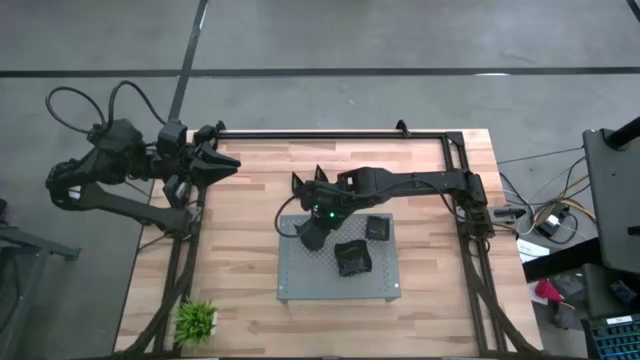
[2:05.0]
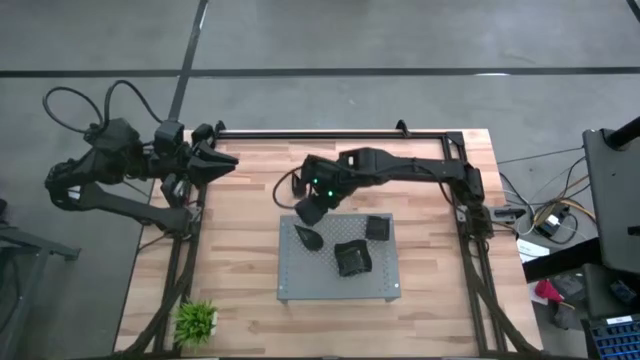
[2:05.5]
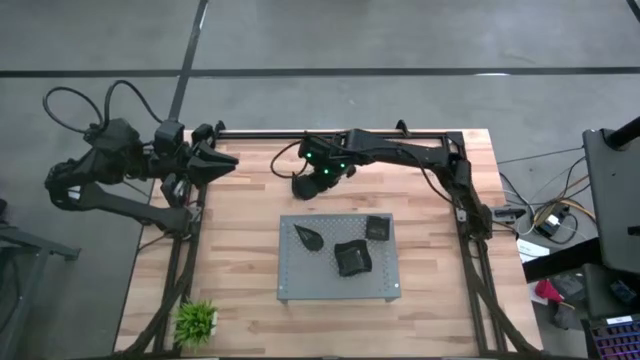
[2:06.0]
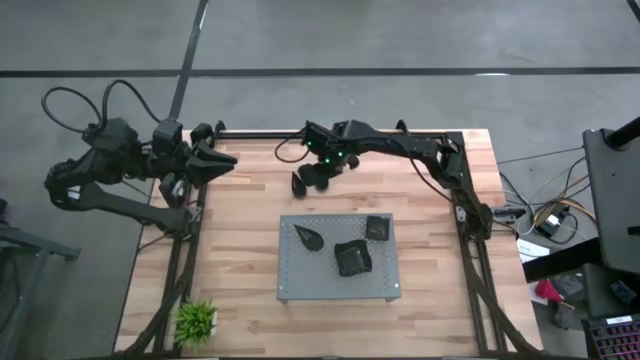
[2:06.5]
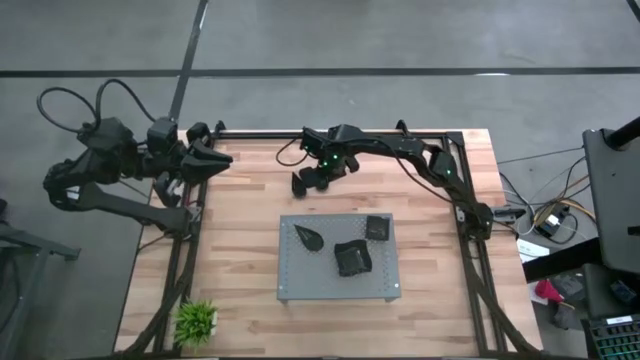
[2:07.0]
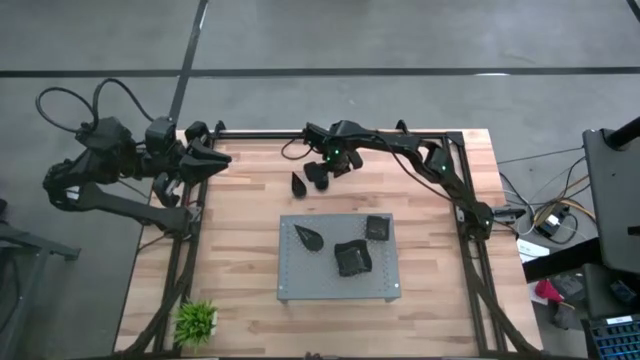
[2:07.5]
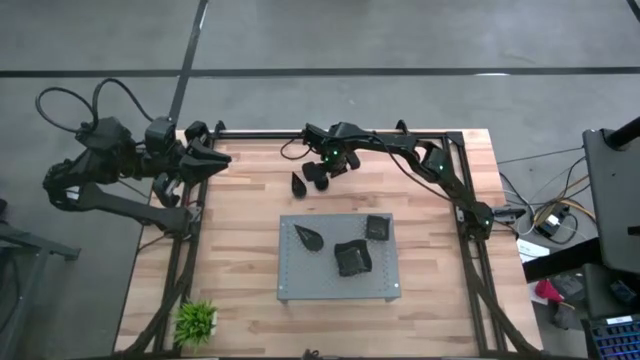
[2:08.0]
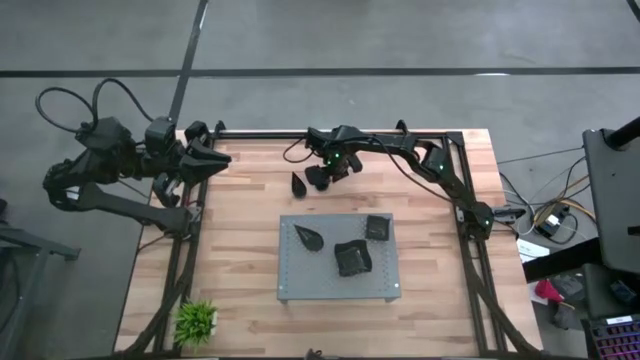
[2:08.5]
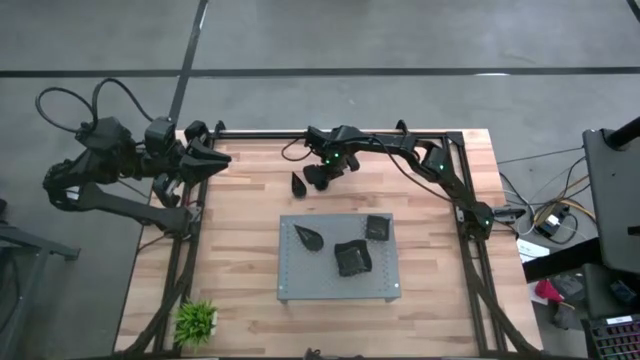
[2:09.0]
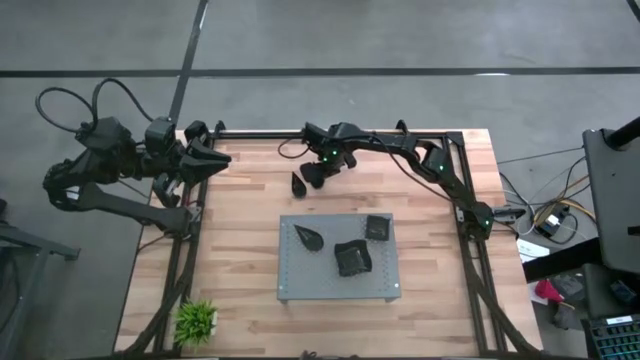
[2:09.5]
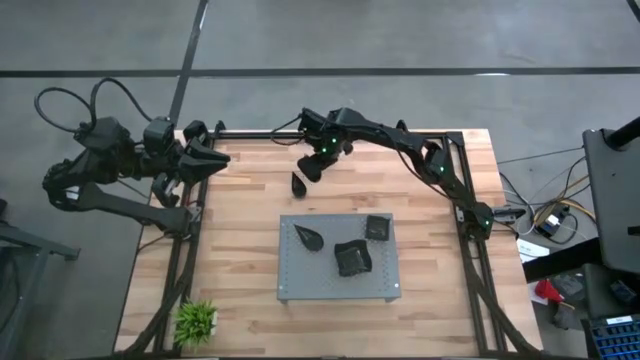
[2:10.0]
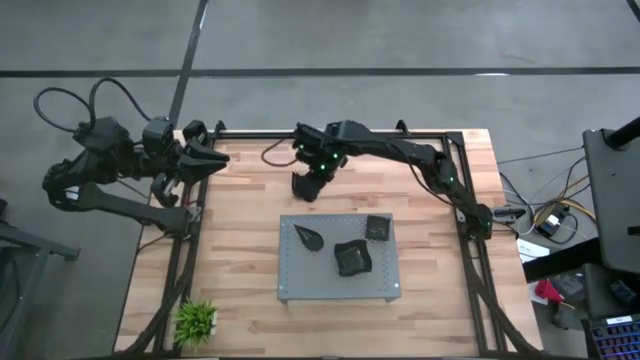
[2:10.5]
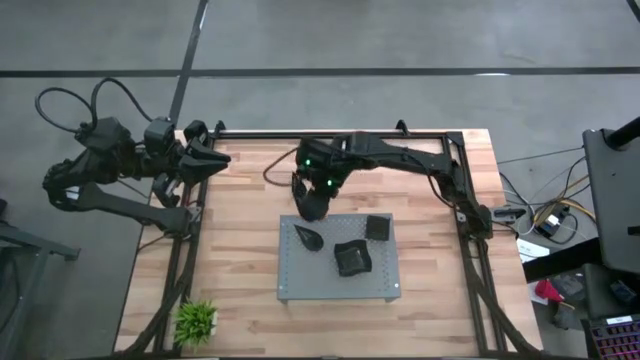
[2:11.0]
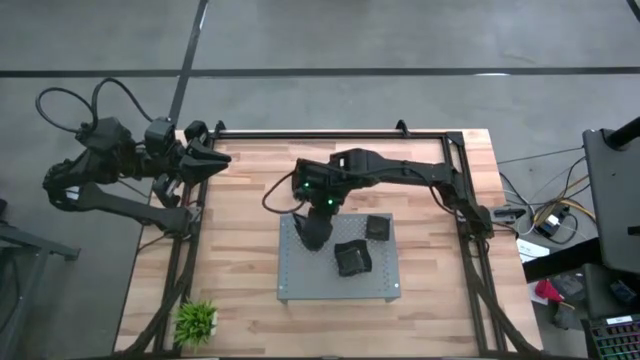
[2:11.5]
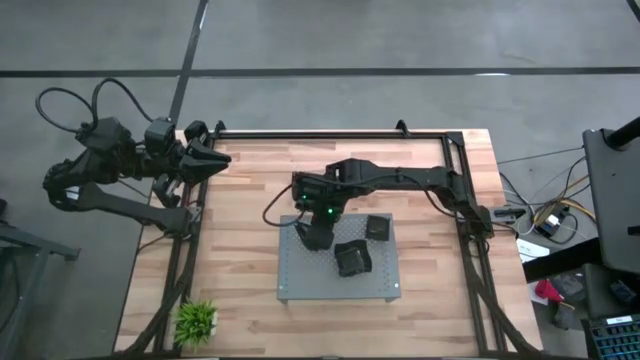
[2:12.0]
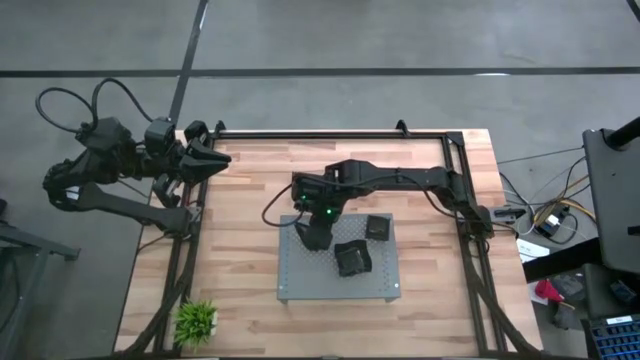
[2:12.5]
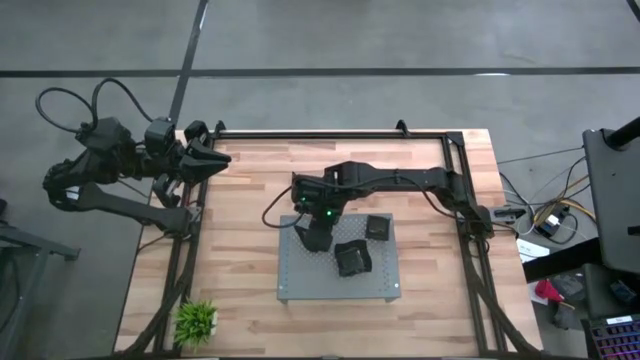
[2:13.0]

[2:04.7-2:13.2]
Task: Pick & Place Mini shaped plates
Stack the drop shaped plate on top of the other drop shaped plates on the shelf

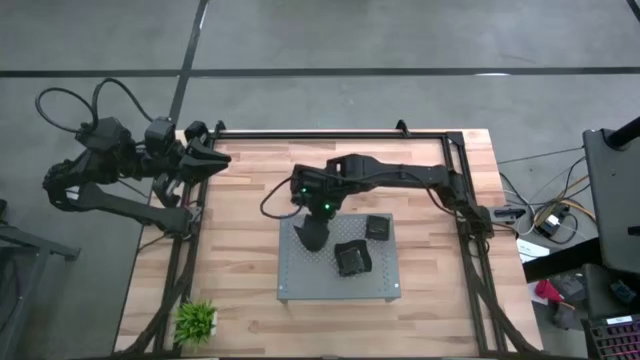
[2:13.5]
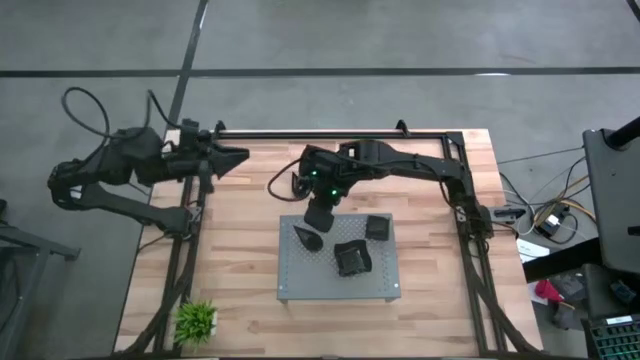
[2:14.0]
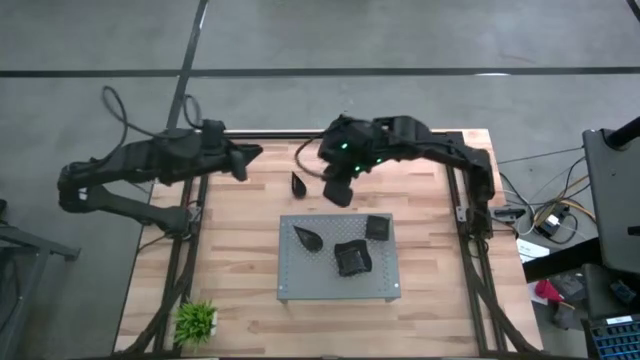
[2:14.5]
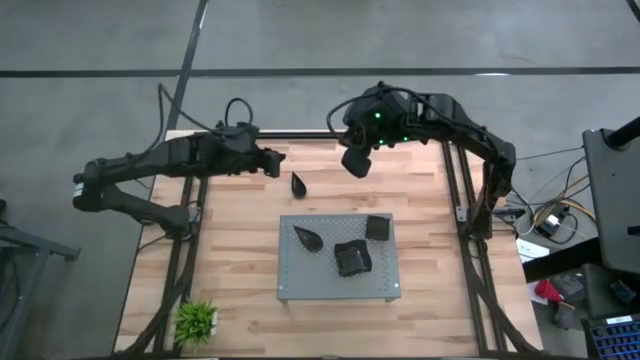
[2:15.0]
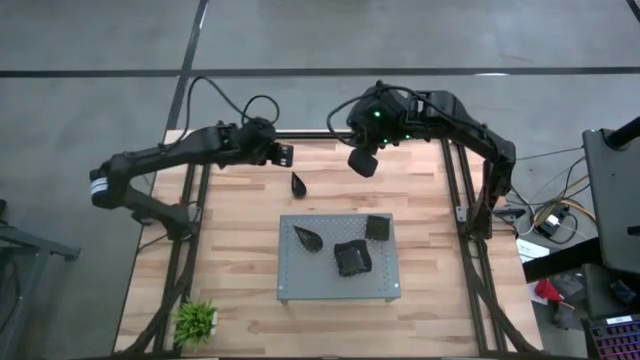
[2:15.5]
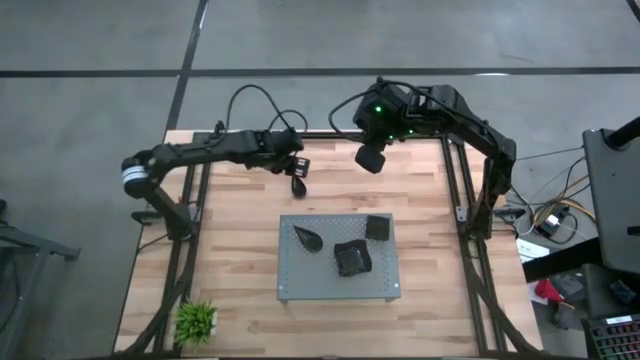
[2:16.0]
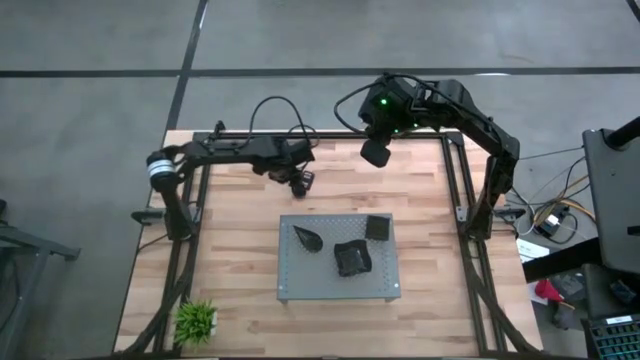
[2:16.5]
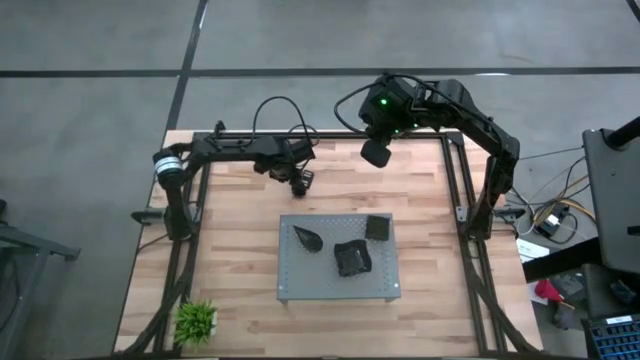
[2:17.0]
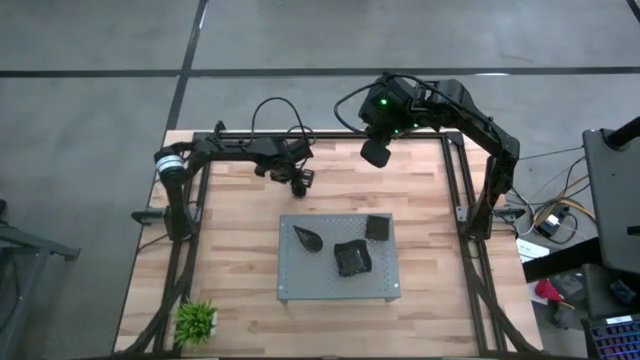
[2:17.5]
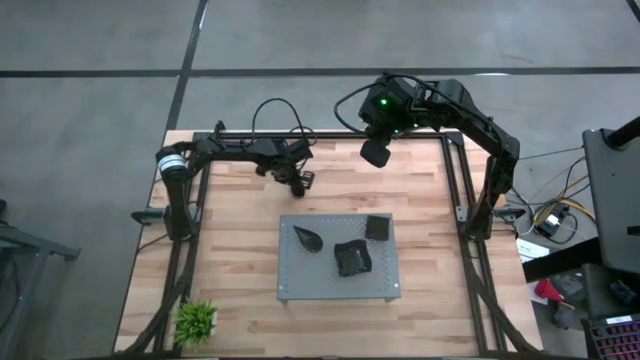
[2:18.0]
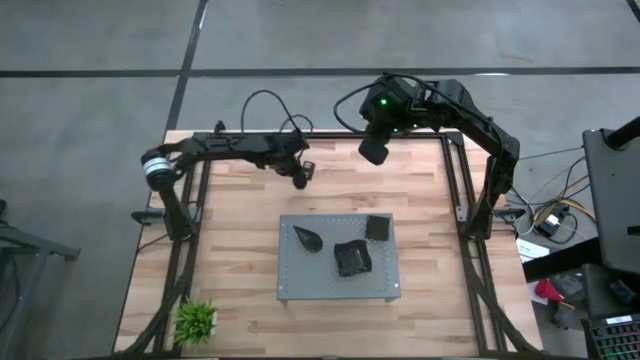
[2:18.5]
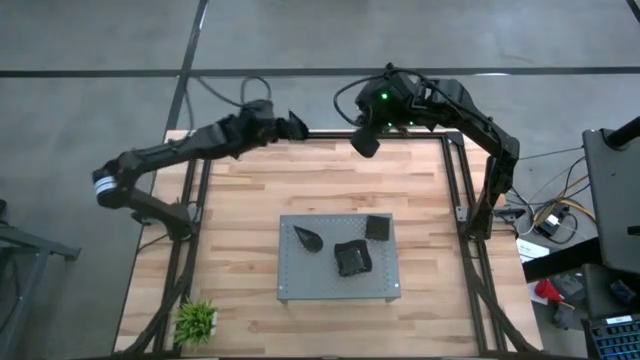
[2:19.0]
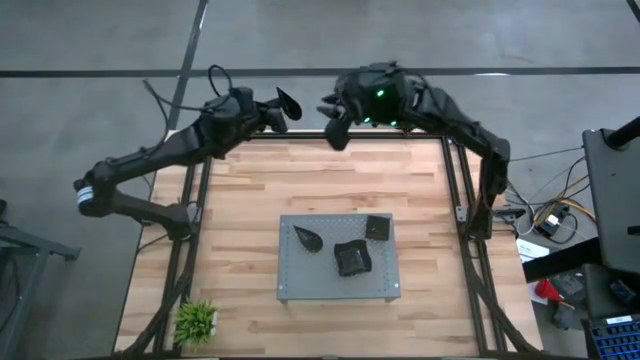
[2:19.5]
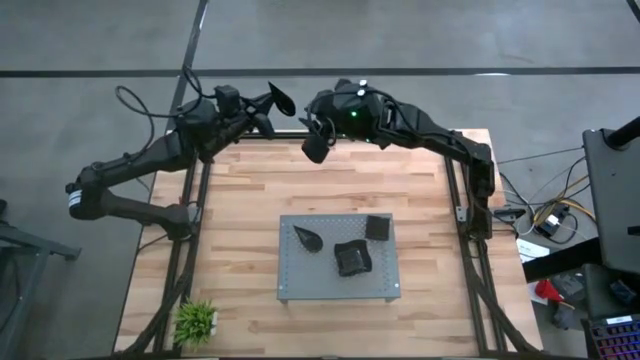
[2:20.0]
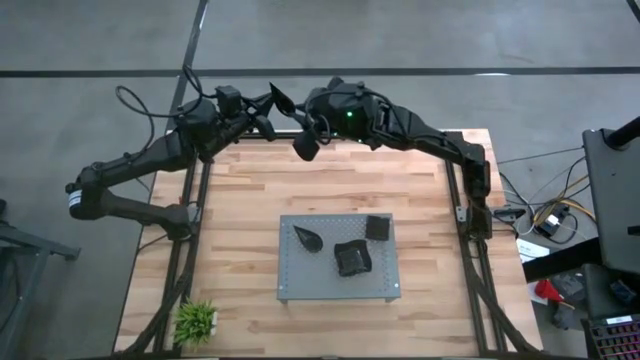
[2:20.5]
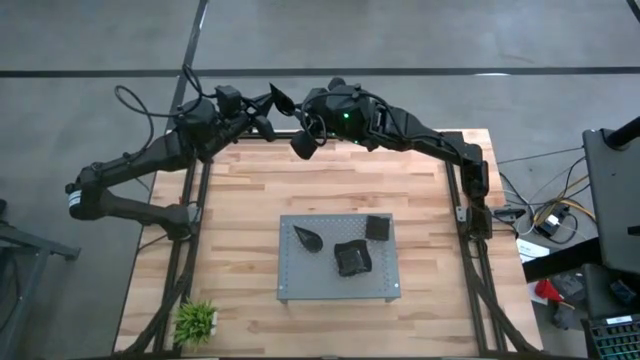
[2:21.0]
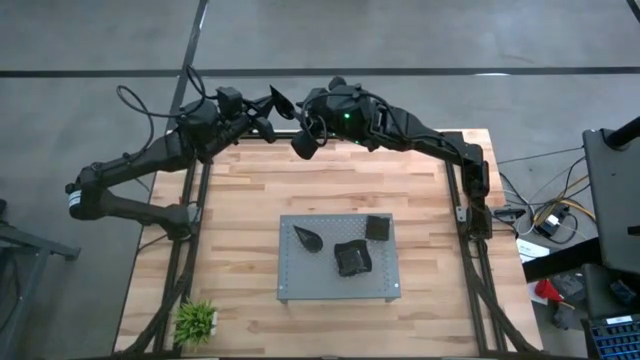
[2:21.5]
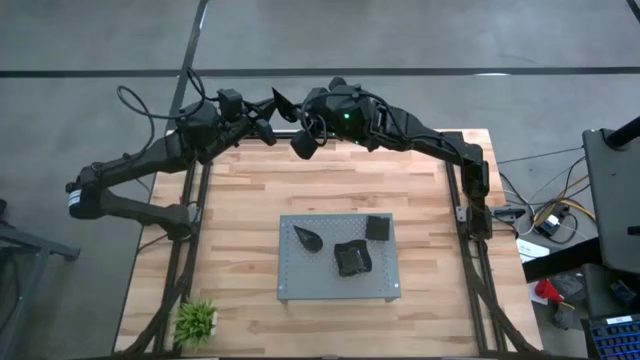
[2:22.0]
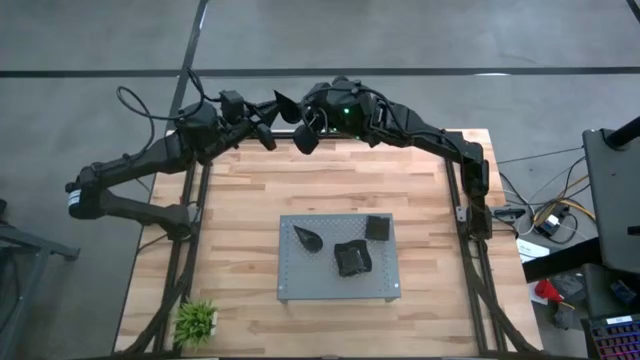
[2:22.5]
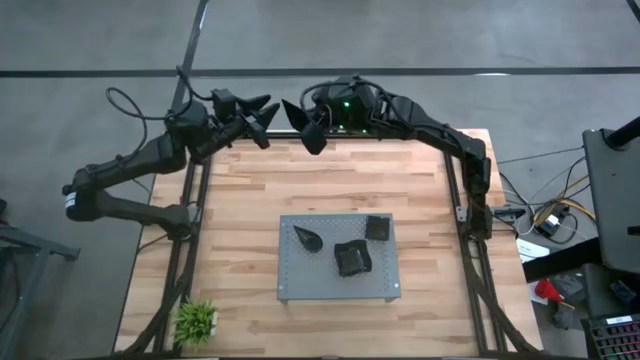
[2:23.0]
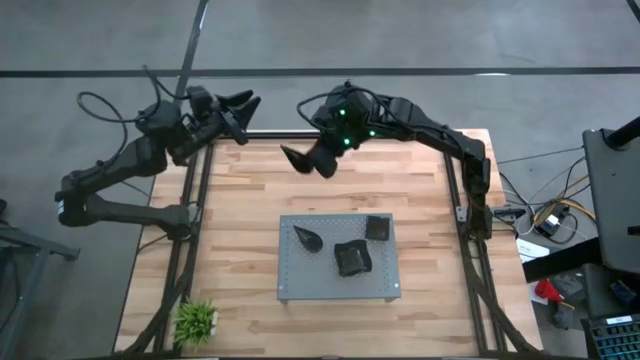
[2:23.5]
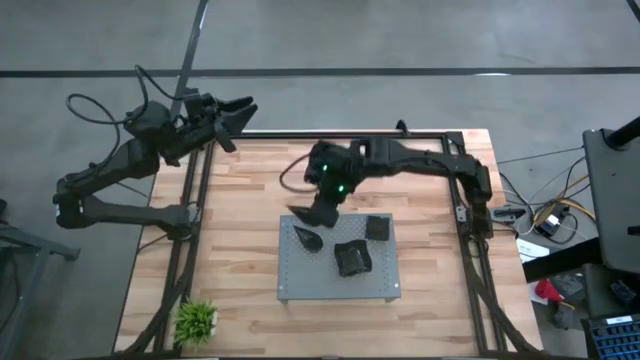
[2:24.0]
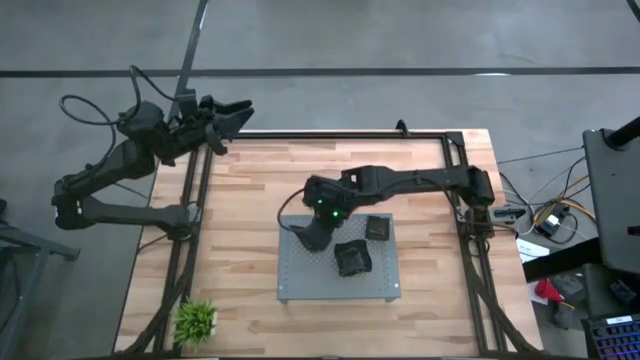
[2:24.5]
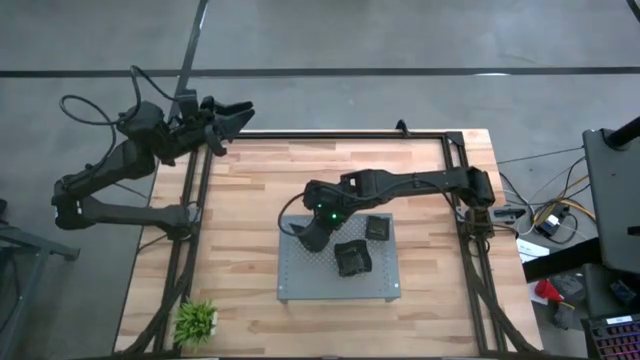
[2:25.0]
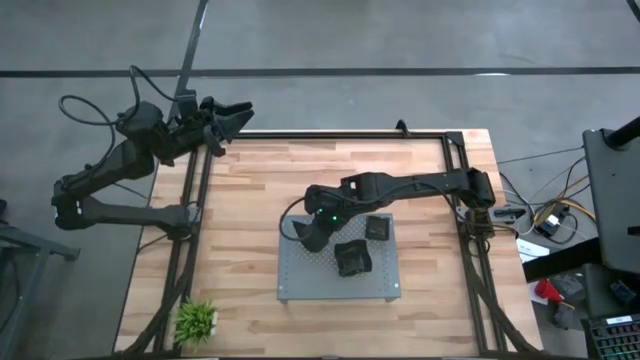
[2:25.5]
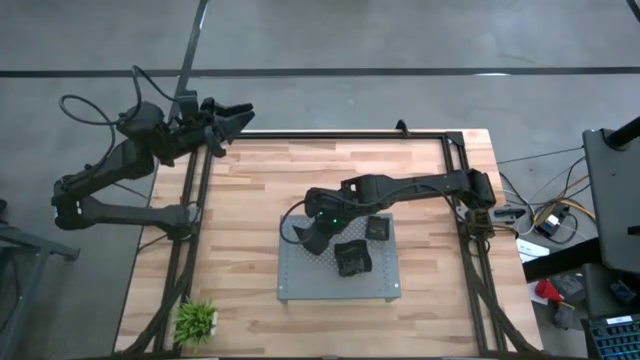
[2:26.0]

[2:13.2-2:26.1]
Stack the drop shaped plate on top of the other drop shaped plates on the shelf
